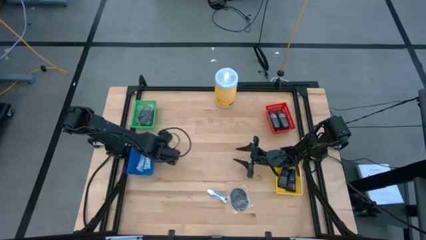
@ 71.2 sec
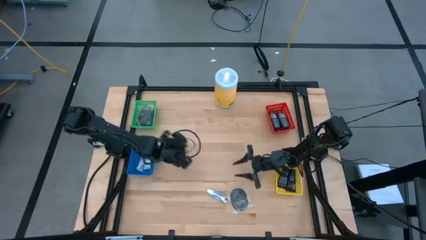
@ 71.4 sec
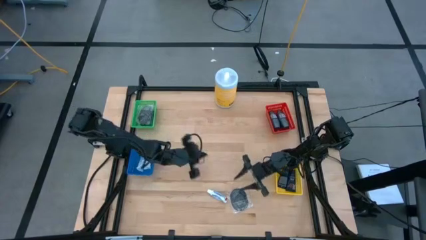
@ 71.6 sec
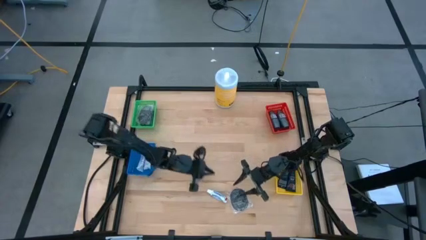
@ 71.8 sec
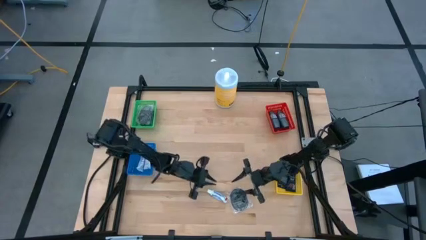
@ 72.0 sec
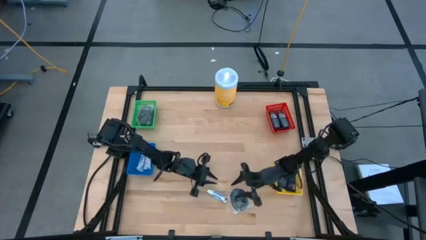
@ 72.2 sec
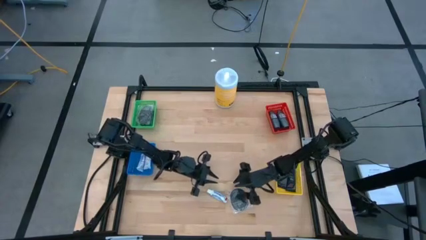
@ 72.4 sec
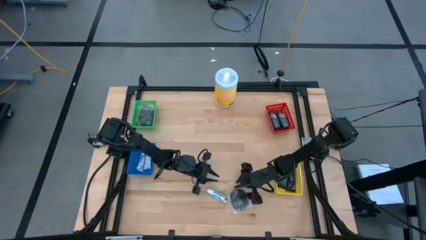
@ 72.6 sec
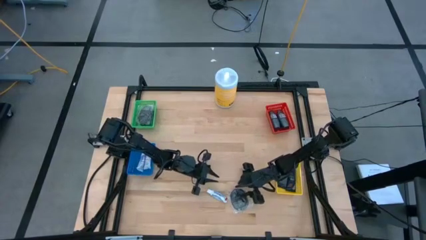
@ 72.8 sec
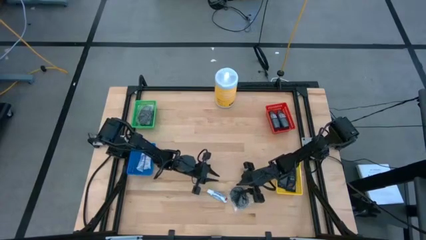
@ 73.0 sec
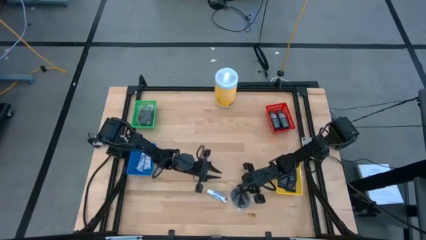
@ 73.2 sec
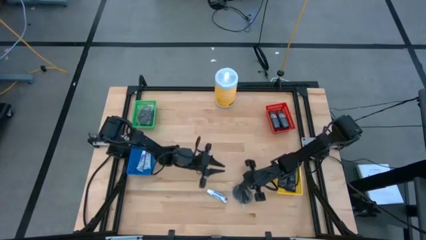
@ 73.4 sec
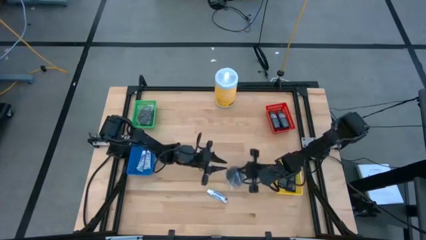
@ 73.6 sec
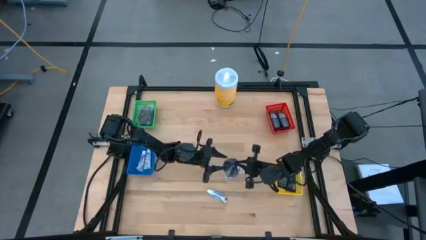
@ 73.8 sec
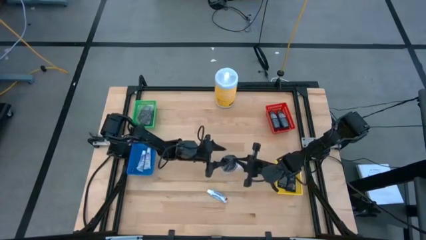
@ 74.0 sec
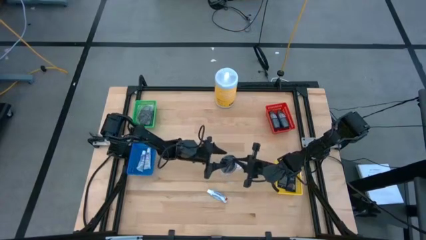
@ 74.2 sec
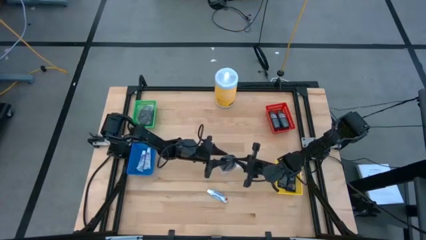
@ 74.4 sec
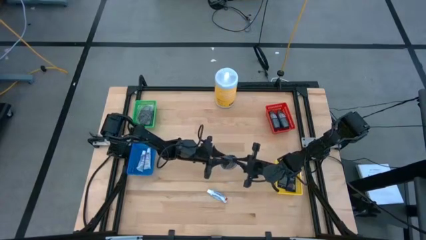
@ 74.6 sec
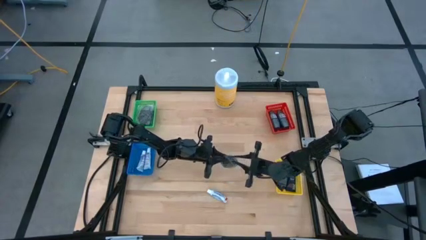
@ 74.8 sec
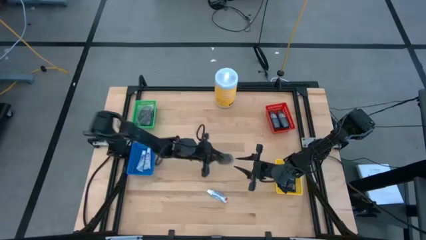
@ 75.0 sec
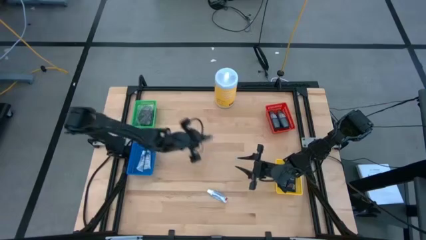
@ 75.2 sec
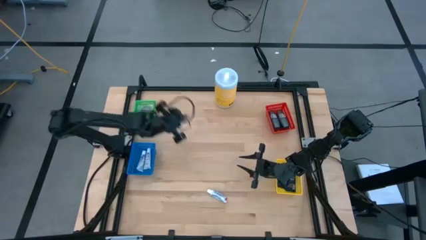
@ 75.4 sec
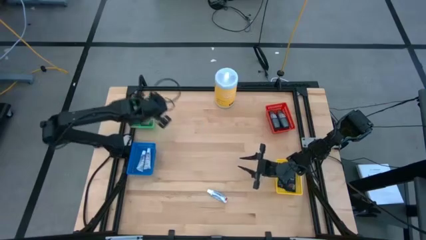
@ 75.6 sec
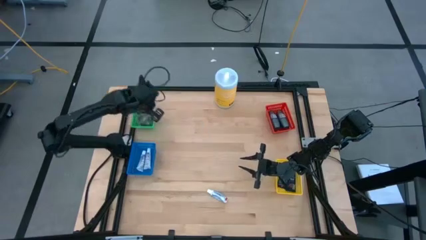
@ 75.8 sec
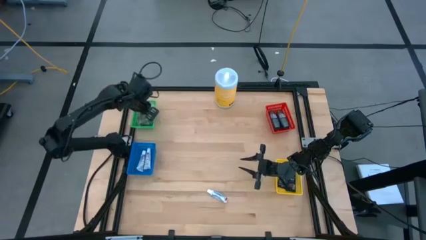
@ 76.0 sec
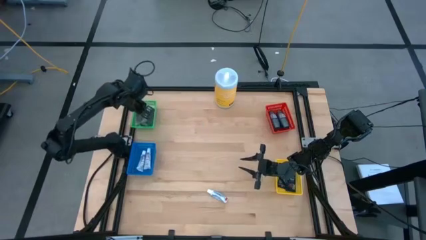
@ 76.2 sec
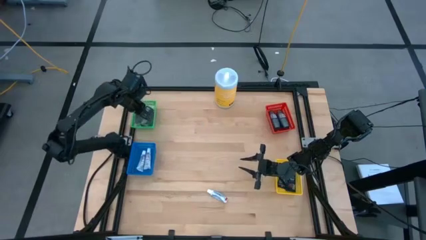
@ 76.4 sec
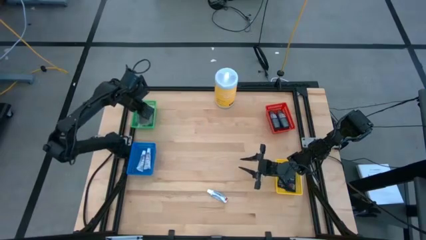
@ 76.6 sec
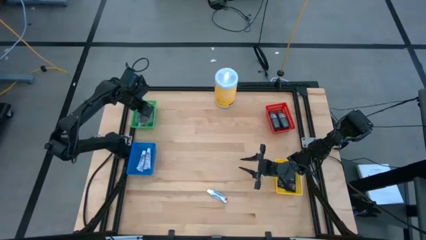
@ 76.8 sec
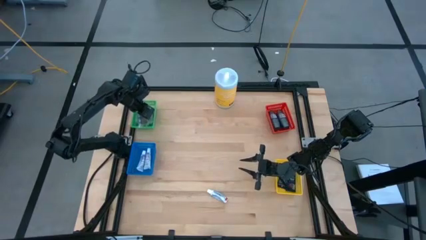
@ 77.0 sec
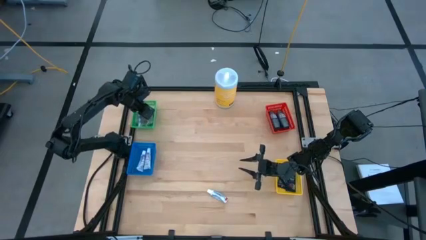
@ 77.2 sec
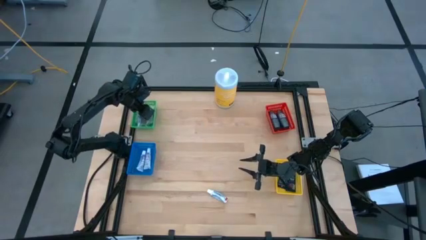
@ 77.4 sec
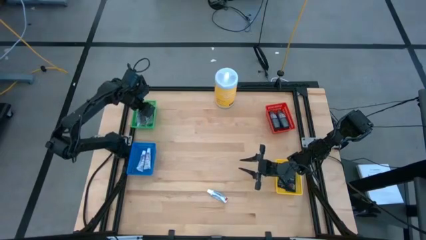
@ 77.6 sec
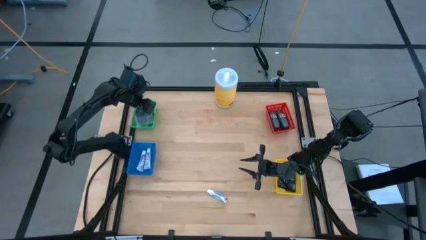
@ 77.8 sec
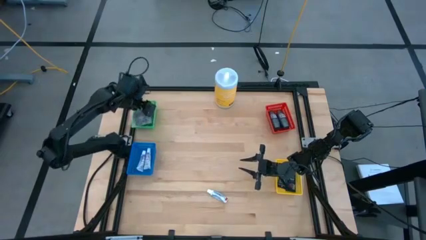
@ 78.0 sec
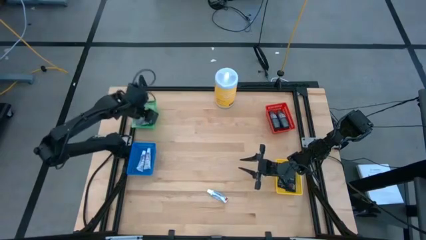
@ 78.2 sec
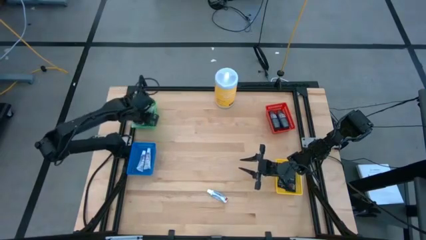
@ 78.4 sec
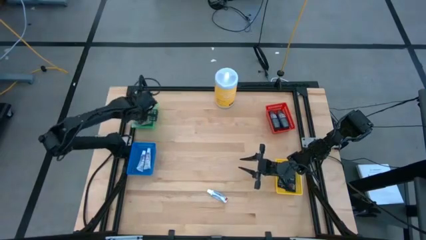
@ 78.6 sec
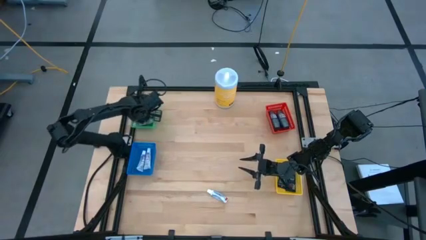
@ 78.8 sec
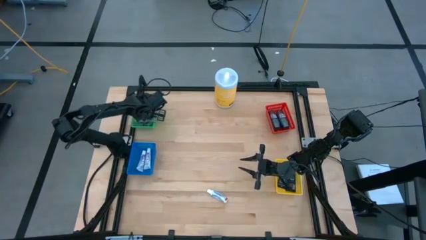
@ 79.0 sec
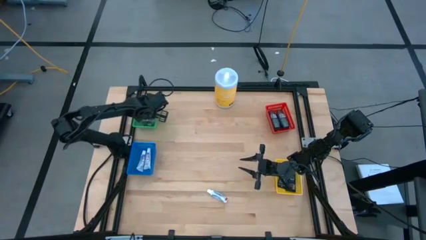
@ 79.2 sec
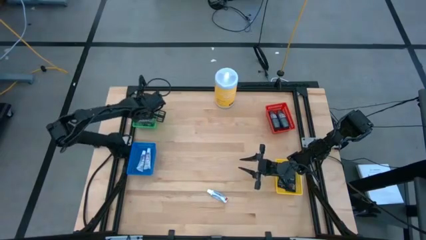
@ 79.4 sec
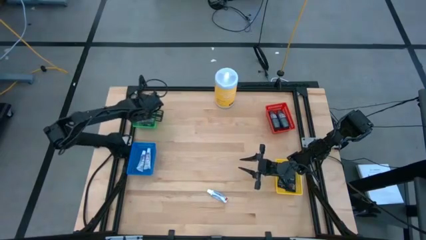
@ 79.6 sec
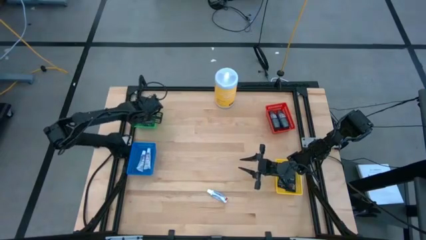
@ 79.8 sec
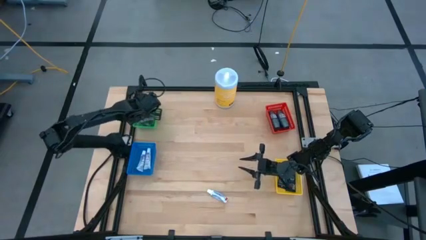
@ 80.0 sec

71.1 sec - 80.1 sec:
Task: Pick & Place Travel size toiletries
Put the hairbrush into the green bin

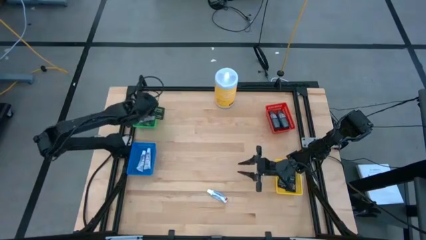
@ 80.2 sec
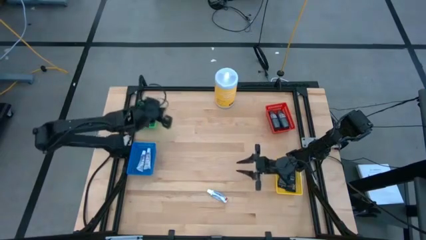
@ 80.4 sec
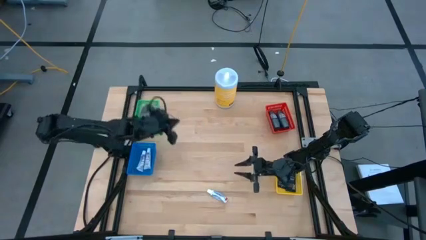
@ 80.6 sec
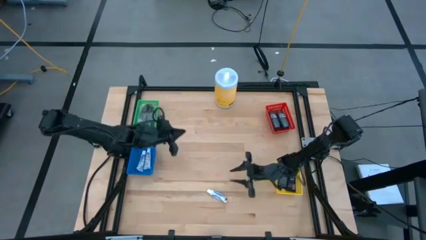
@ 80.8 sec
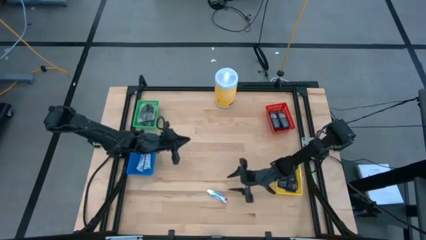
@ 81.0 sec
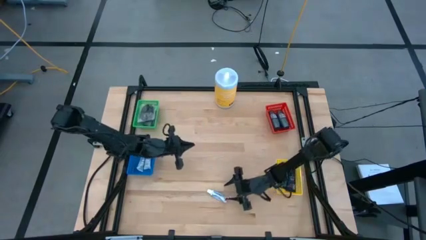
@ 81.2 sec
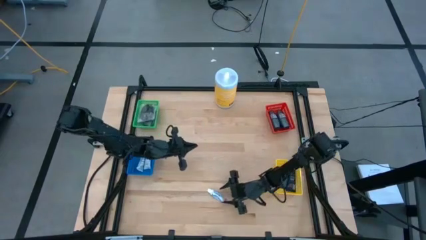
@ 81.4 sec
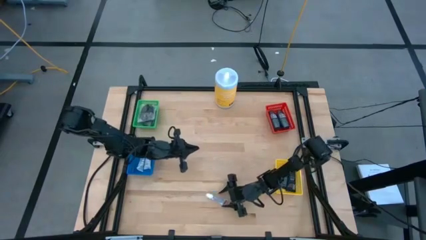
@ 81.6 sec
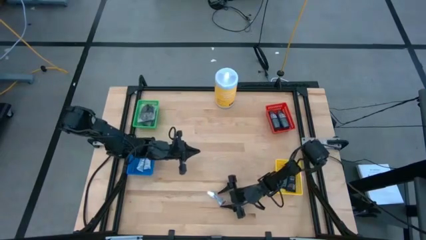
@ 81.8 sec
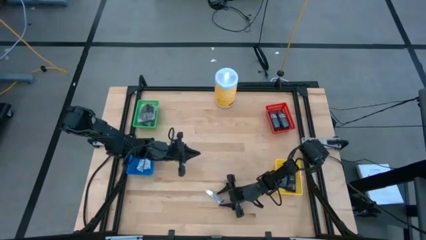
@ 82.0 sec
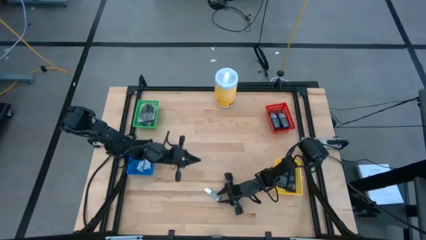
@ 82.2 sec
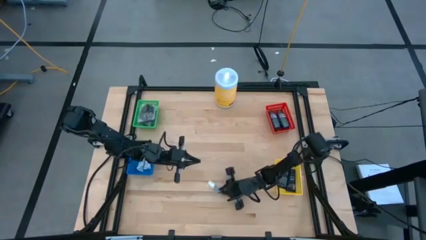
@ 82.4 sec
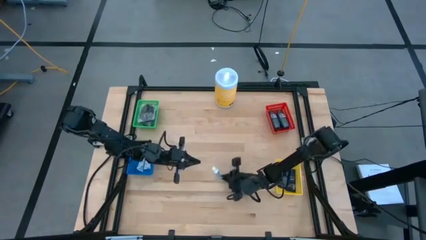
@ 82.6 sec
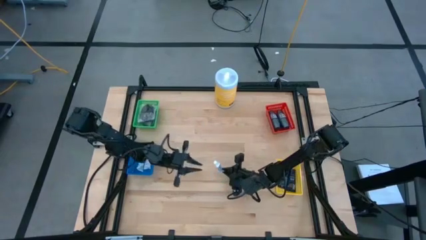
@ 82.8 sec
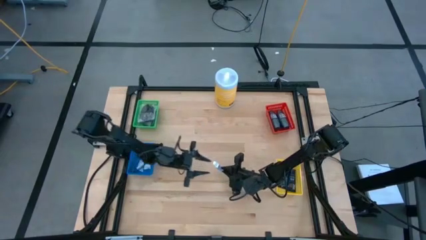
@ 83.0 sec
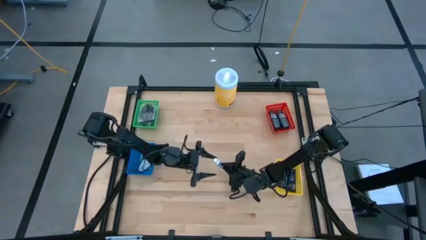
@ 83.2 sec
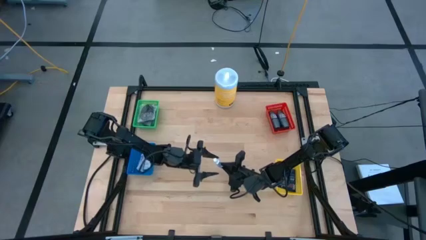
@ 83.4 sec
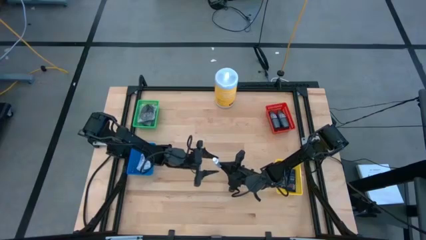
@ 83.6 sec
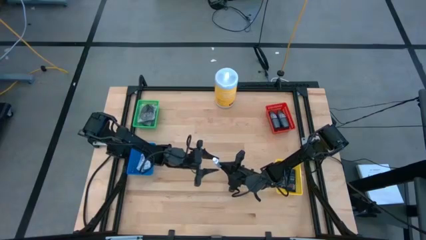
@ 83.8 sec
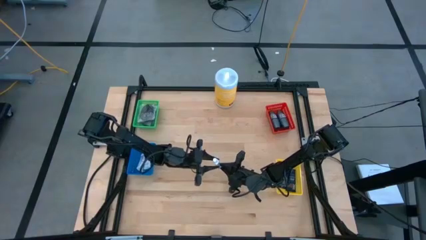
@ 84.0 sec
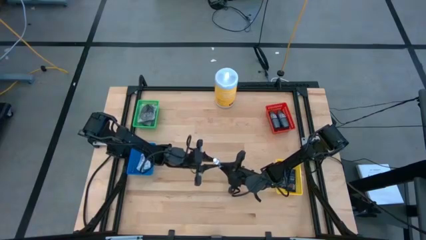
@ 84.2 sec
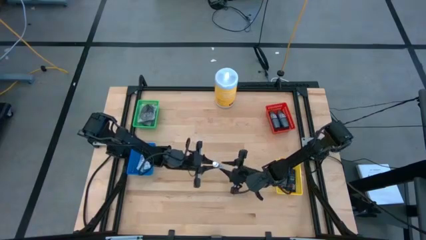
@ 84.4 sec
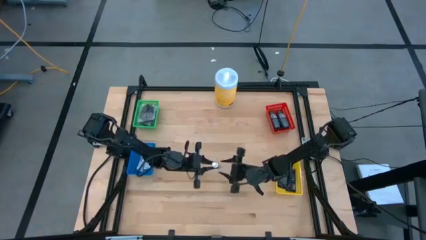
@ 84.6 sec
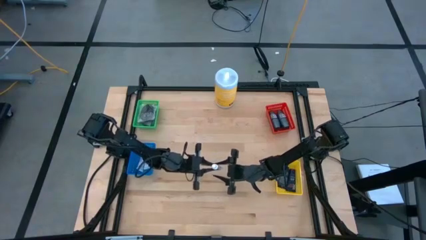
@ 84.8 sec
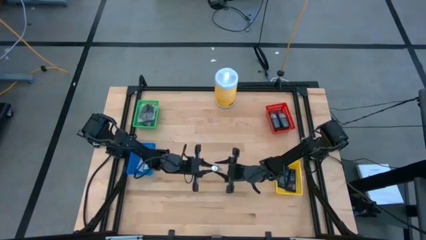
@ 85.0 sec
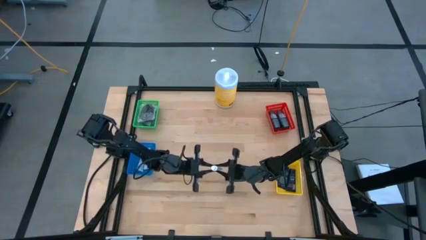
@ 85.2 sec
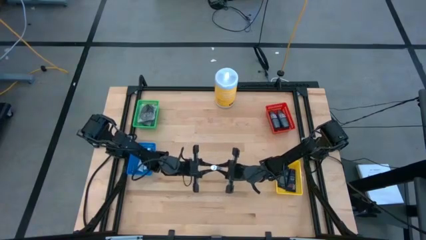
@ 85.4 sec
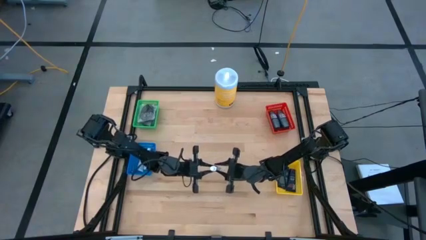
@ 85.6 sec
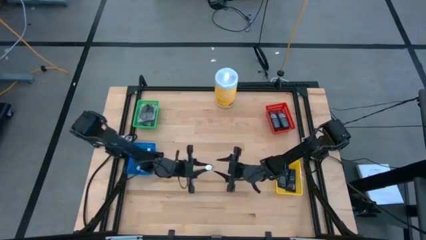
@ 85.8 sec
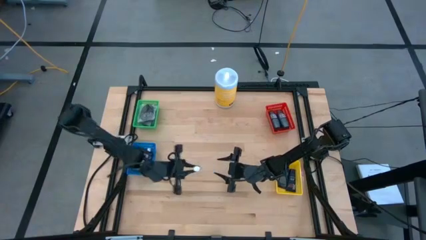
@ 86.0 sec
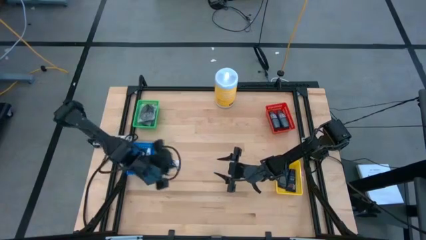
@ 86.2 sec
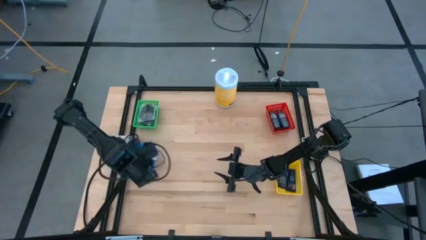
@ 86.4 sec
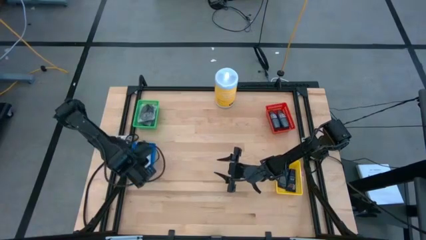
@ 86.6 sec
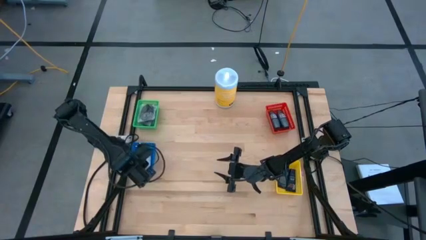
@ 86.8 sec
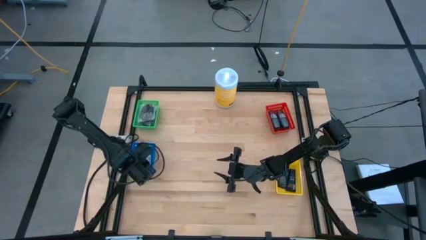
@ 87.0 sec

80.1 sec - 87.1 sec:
Put the toothpaste into the blue bin
